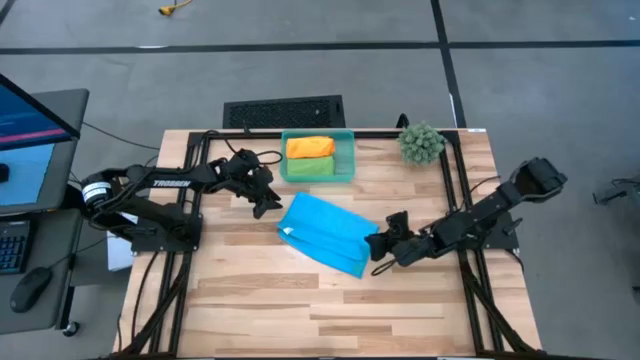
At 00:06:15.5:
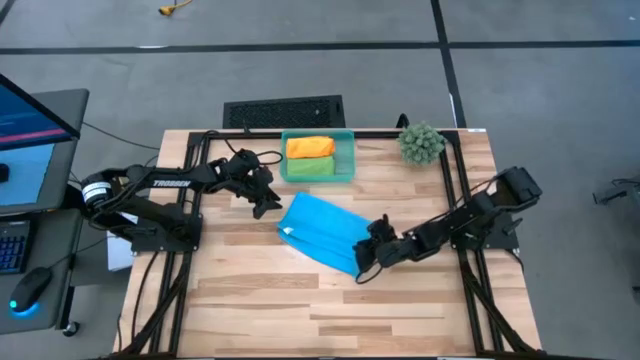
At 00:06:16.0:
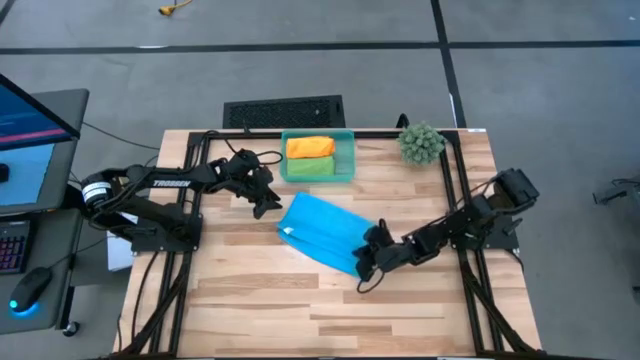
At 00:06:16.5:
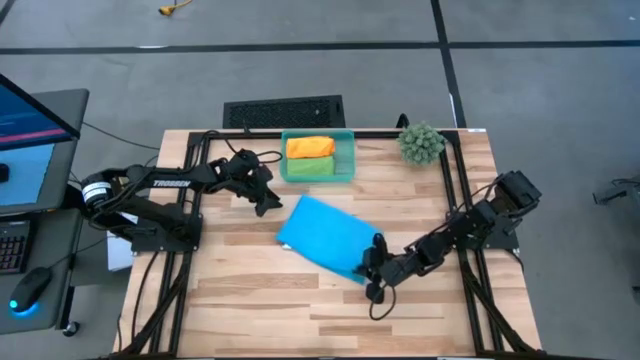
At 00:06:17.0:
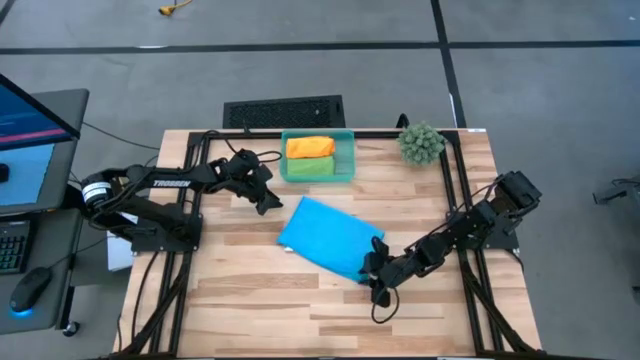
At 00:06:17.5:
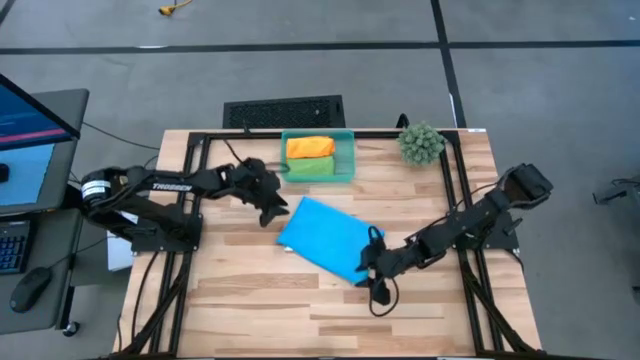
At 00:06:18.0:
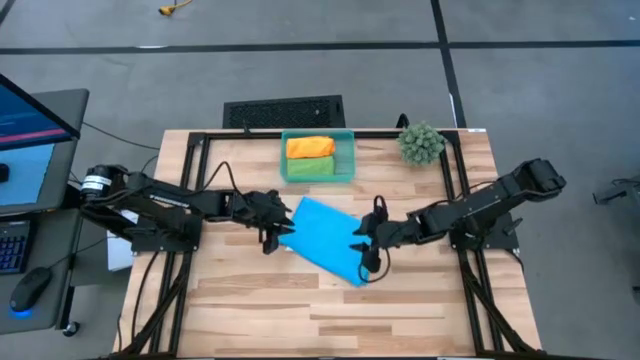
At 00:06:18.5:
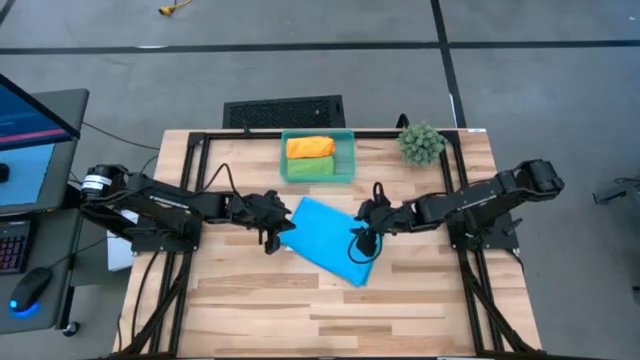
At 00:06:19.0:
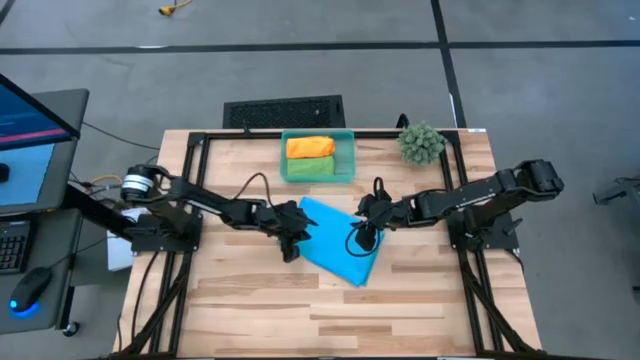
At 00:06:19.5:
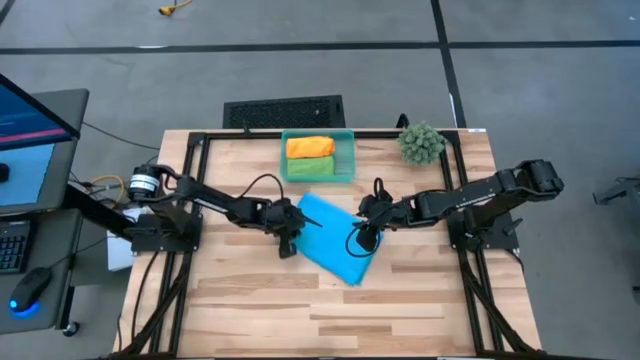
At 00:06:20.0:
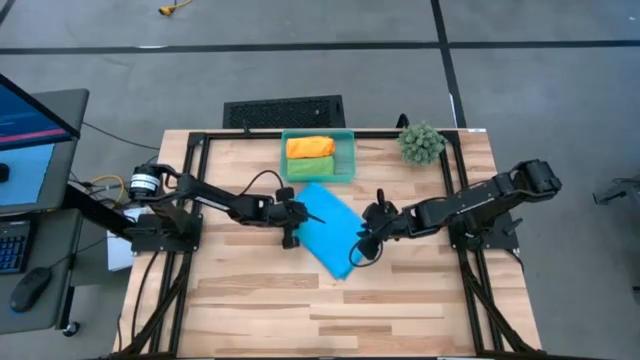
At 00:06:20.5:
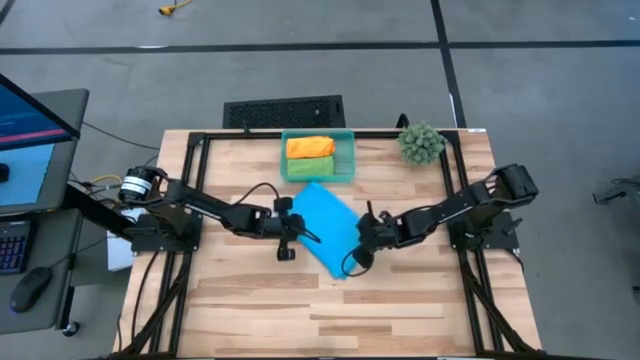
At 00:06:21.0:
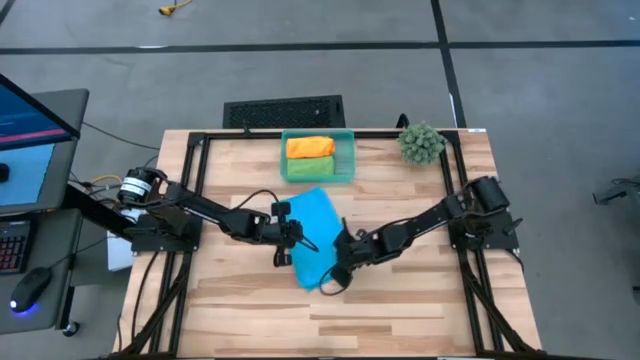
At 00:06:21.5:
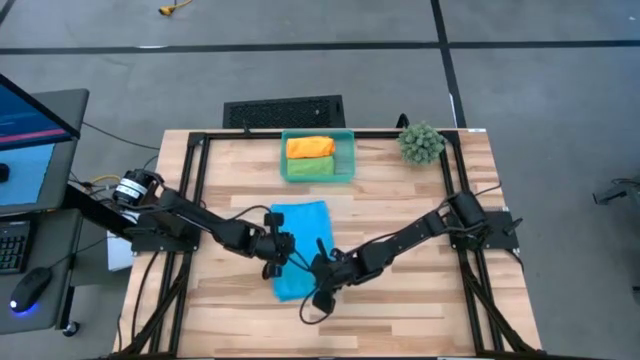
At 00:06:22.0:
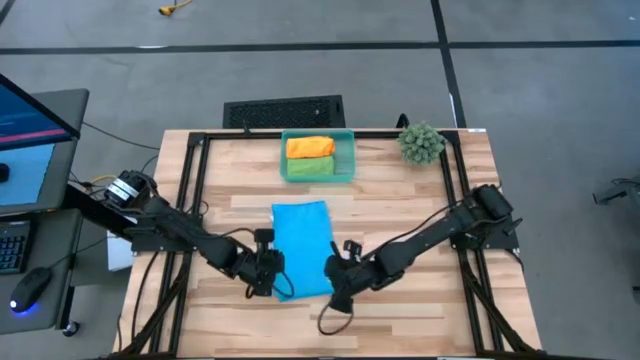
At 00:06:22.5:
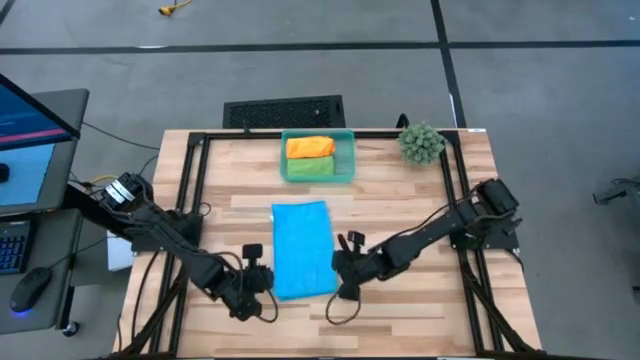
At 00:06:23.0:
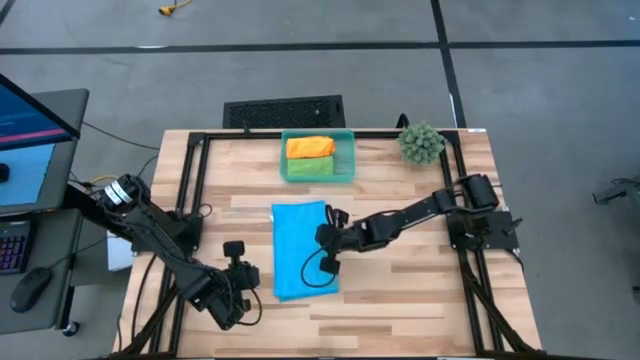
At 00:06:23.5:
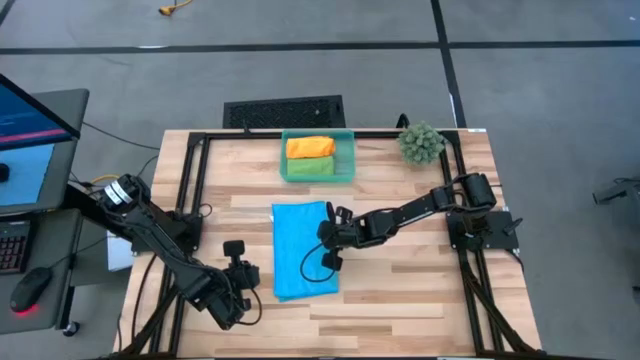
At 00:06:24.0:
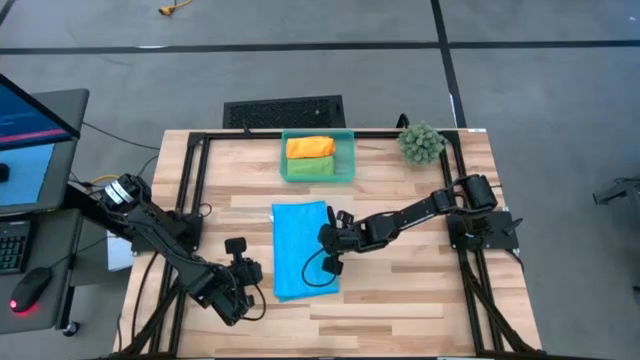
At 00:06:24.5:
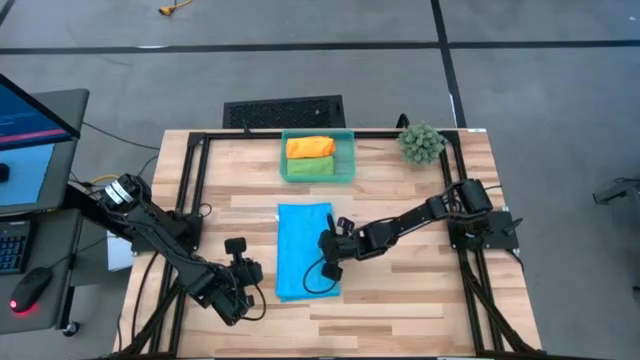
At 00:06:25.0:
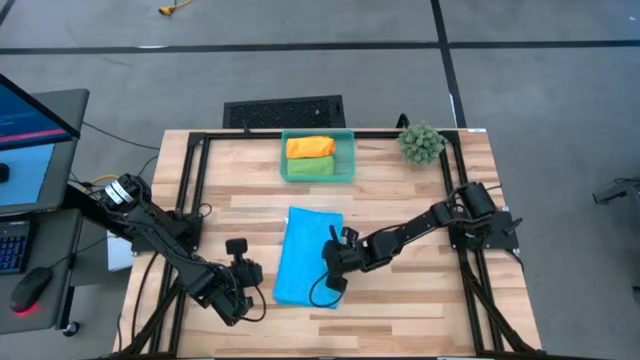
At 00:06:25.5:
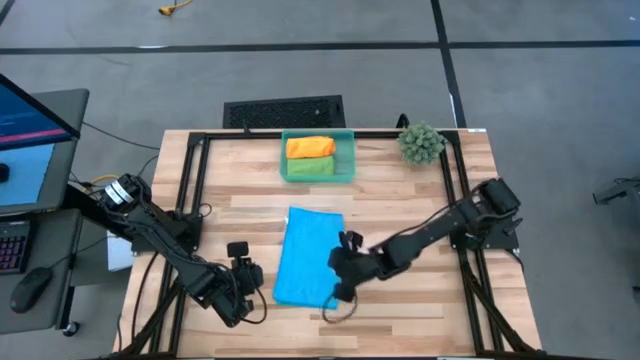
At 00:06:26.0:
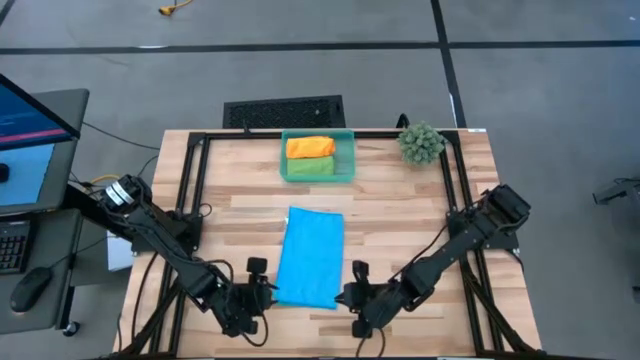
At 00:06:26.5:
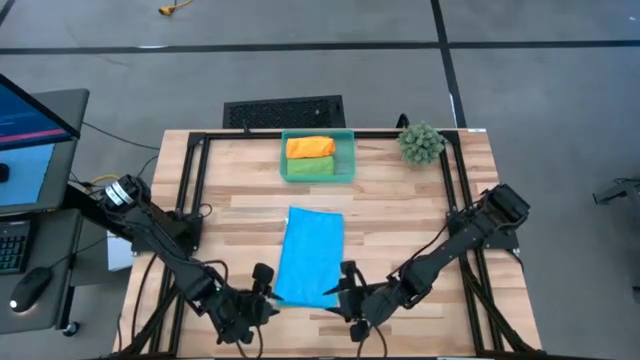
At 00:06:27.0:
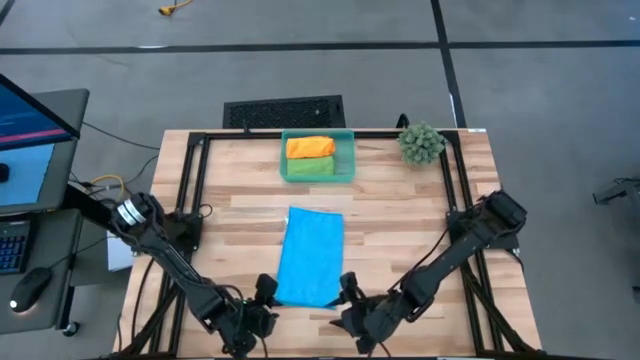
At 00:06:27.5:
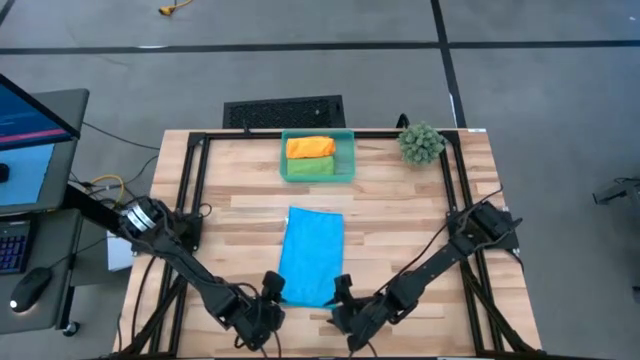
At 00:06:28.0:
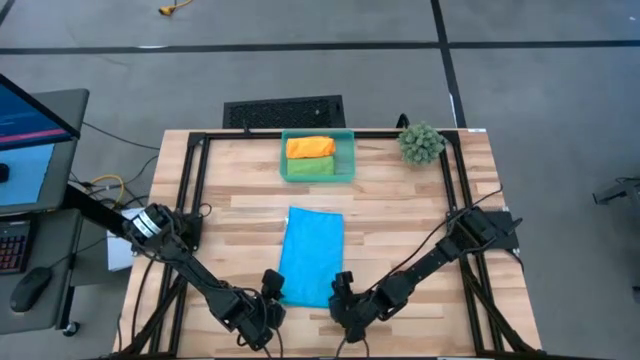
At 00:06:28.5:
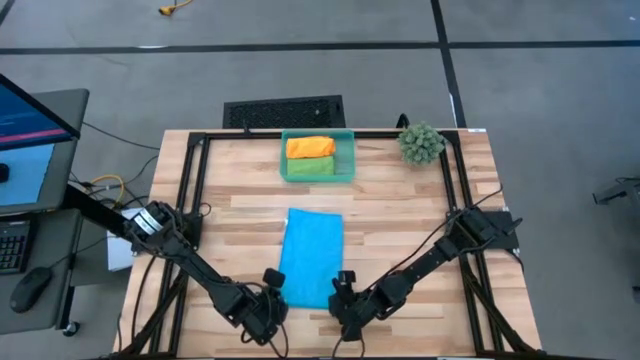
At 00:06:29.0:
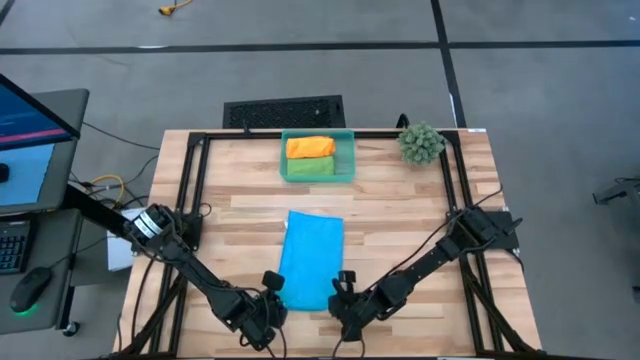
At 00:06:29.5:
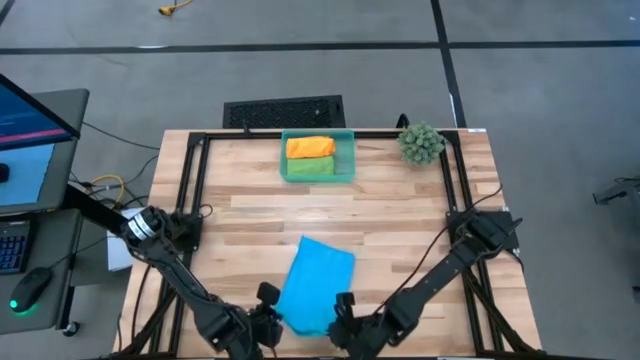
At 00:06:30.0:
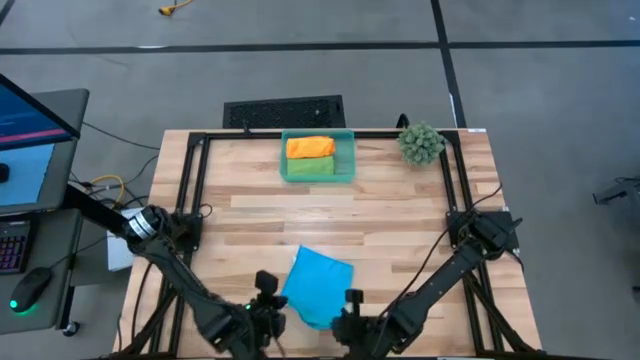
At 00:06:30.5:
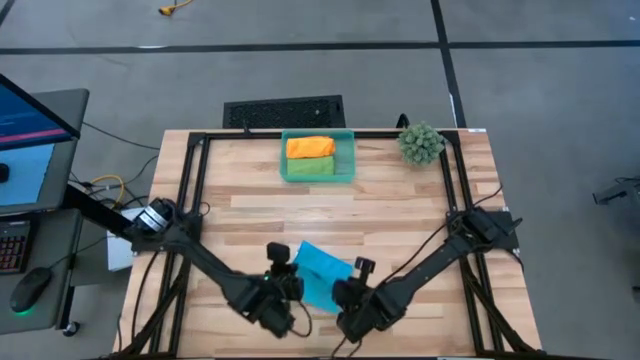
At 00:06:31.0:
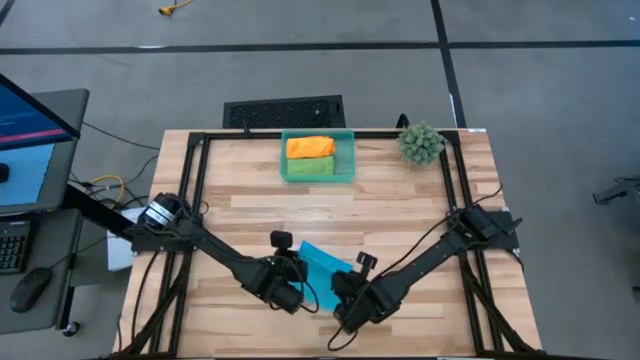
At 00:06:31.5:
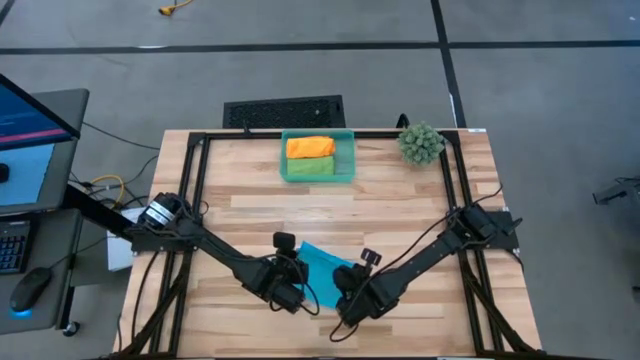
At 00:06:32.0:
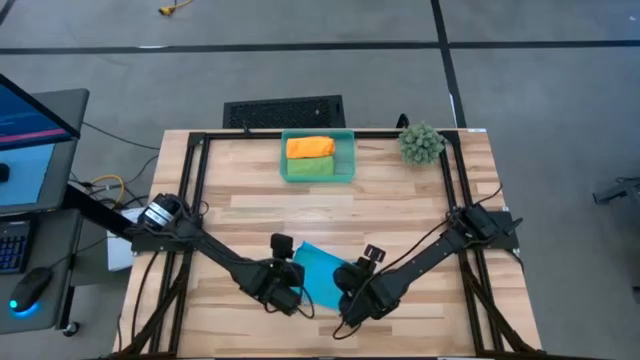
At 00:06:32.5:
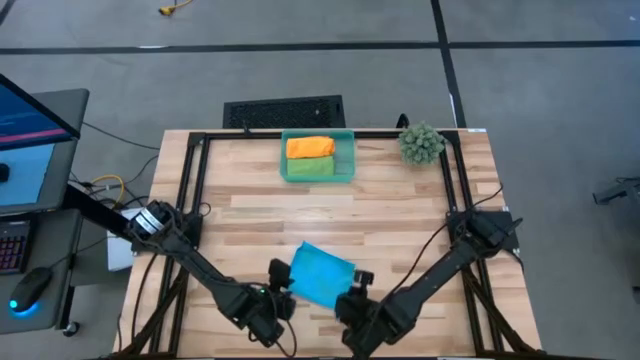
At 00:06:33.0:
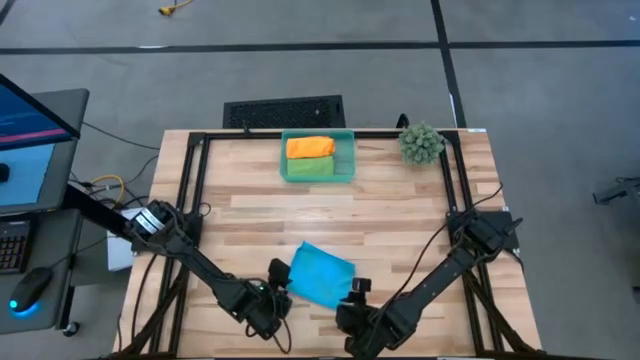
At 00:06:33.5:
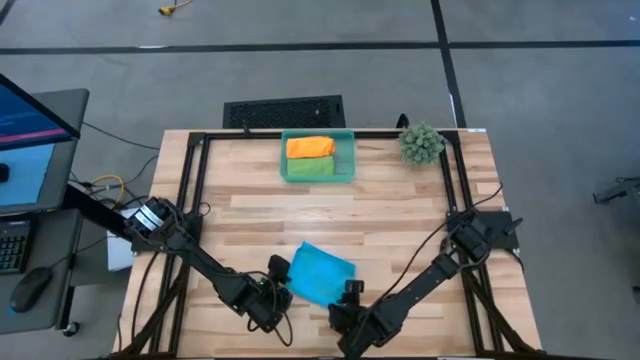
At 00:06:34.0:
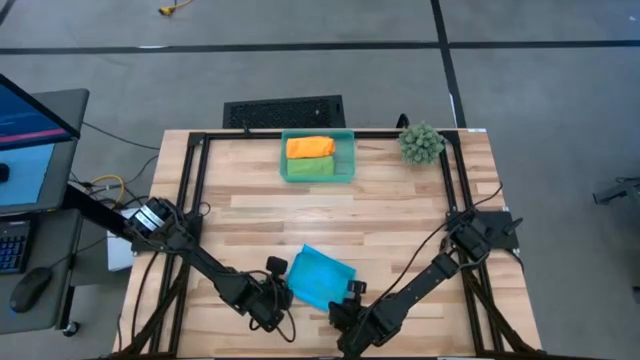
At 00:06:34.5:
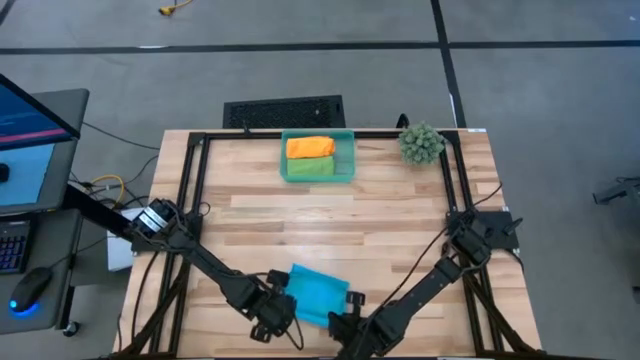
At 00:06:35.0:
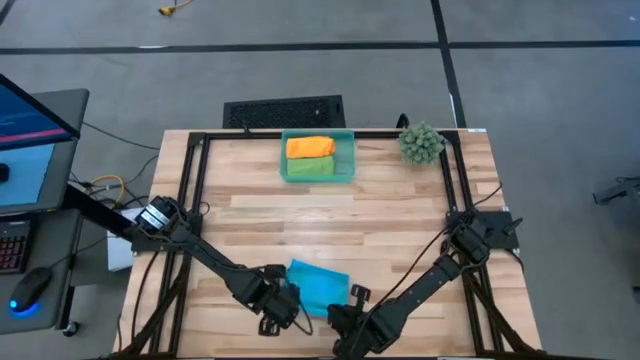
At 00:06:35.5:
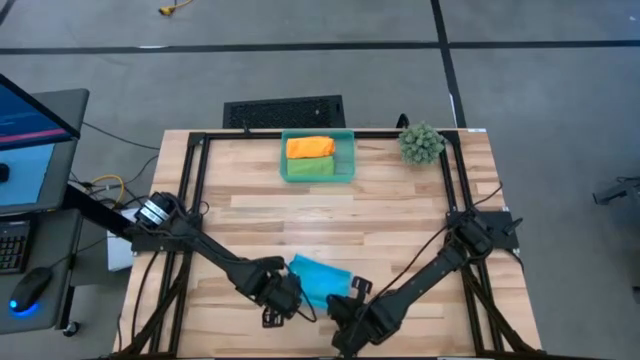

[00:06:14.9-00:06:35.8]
Task: Roll microfiber towels into tight, uniform cylinder then place into a basket
Roll the blue microfiber cloth
